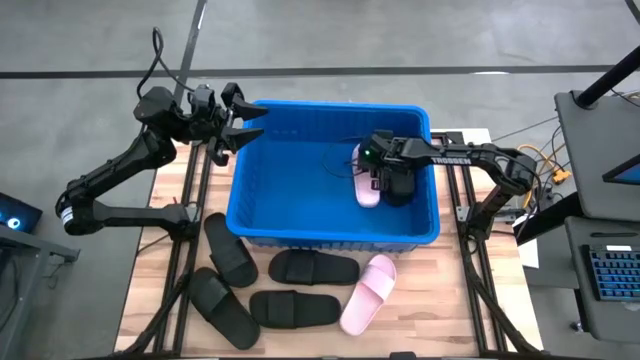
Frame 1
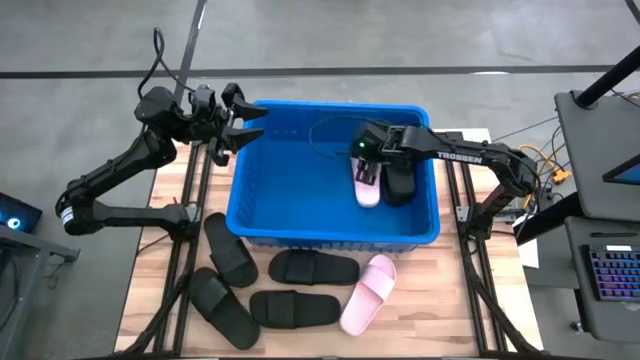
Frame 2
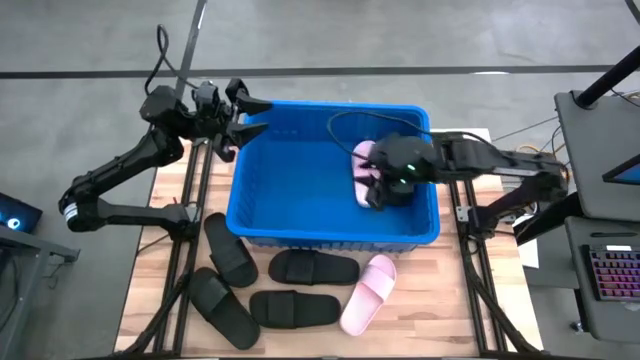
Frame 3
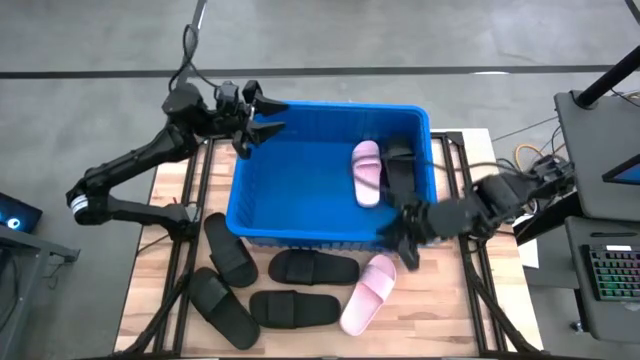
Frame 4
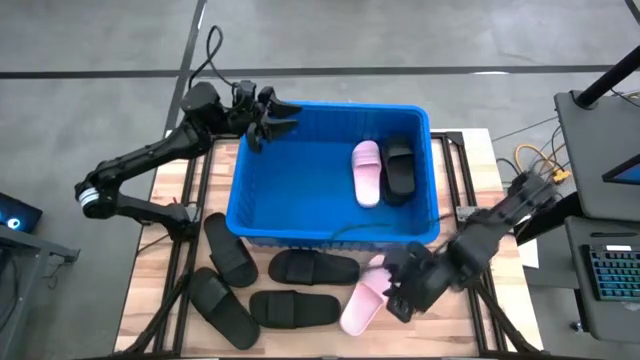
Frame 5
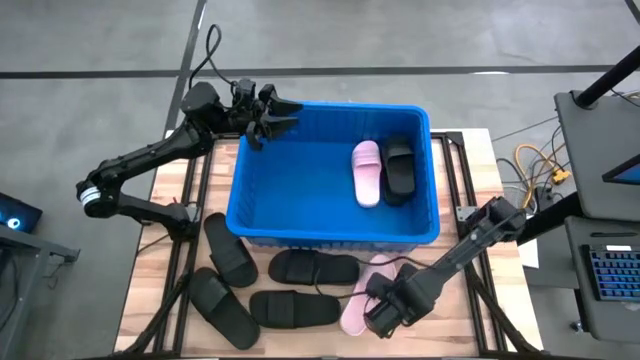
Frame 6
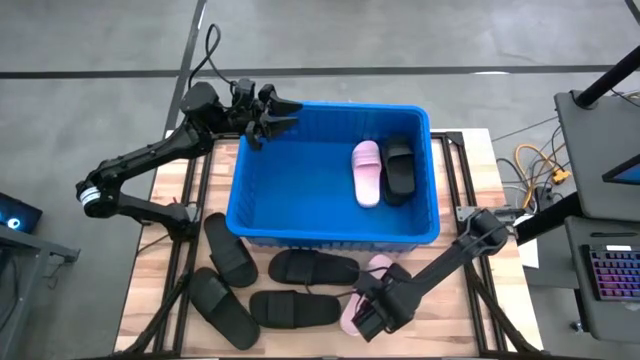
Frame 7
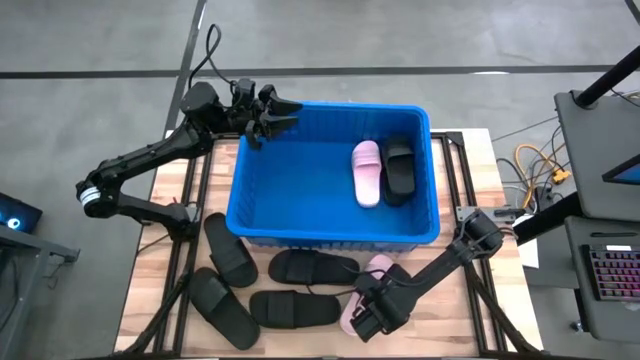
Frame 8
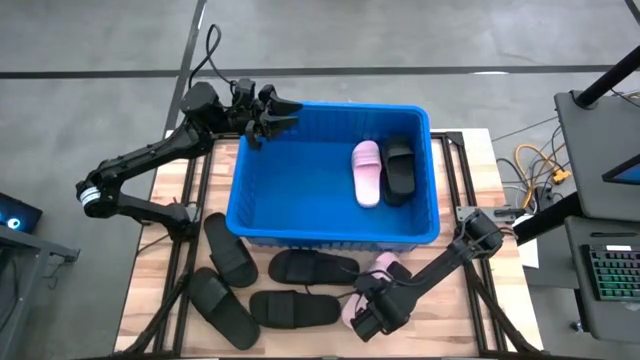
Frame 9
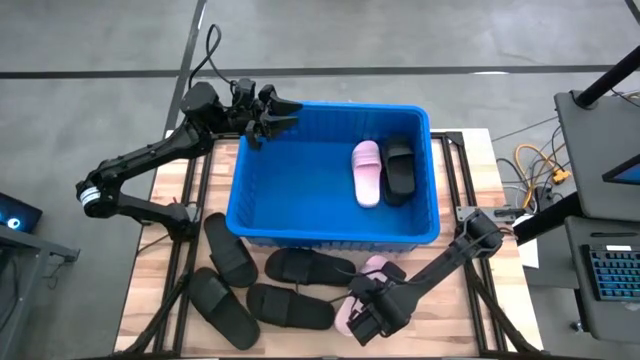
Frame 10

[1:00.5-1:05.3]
Task: Pick and place slides into bin
Put the pink slide into the blue container

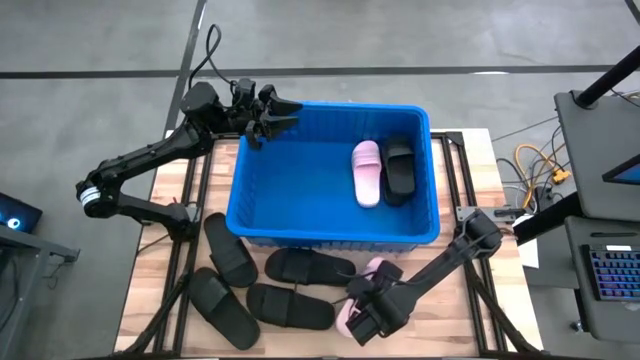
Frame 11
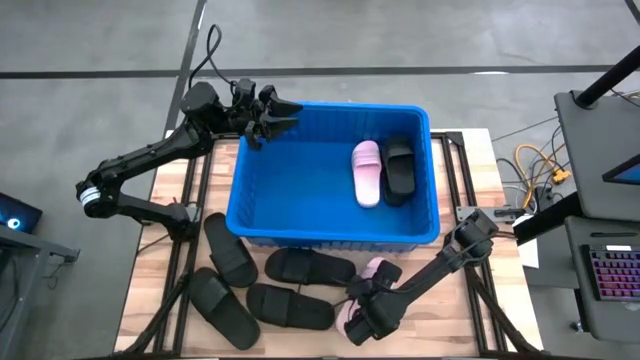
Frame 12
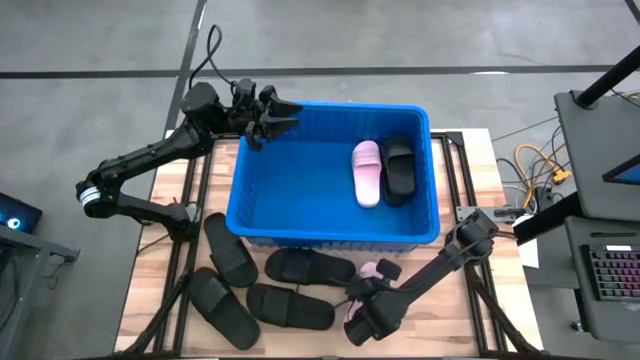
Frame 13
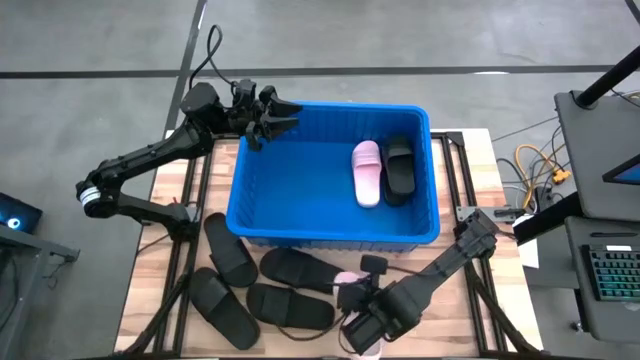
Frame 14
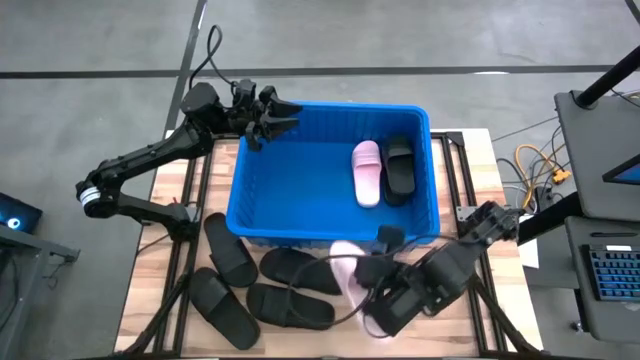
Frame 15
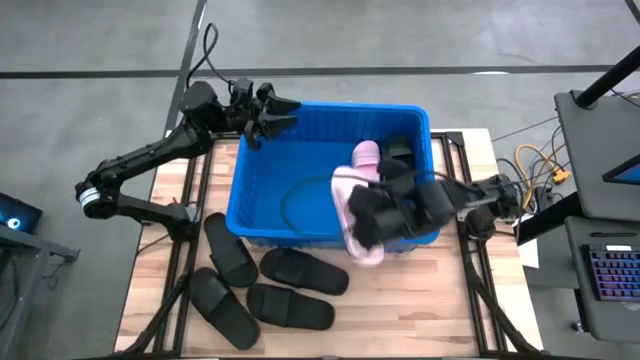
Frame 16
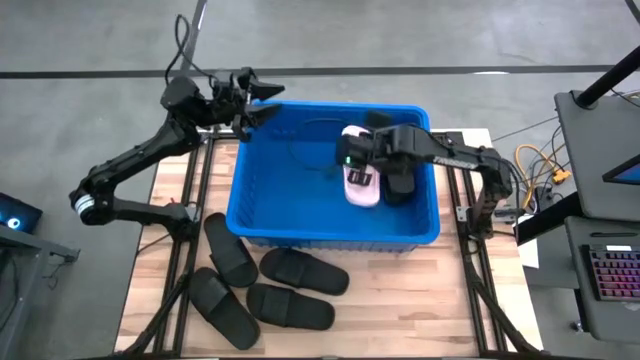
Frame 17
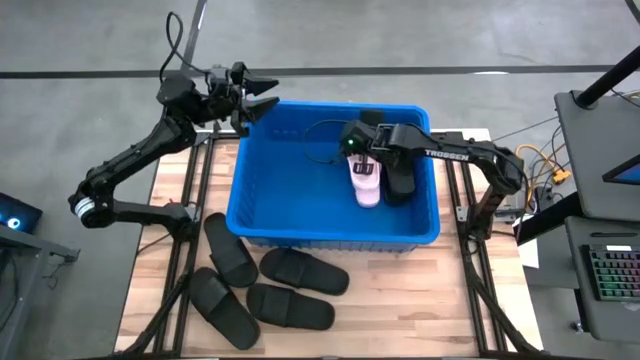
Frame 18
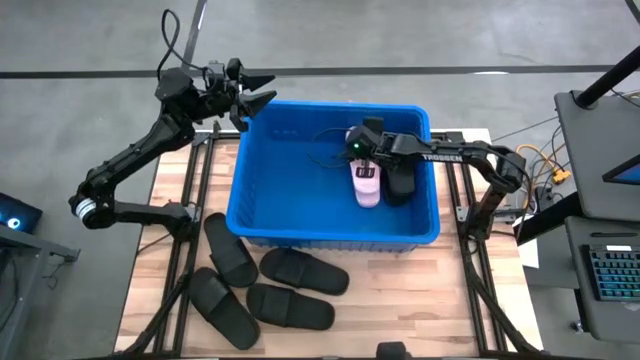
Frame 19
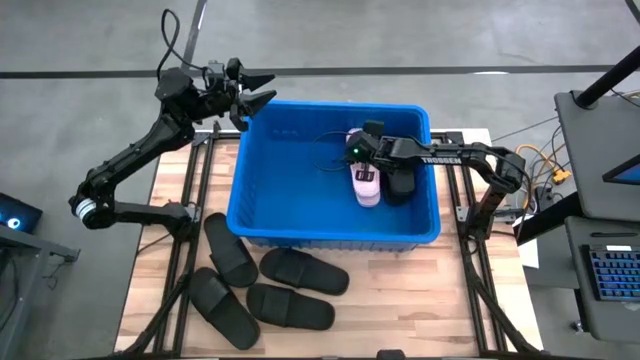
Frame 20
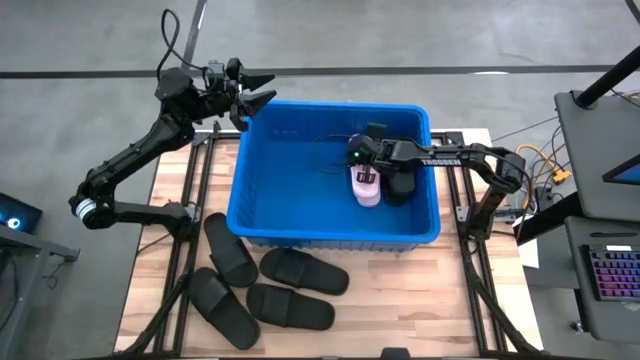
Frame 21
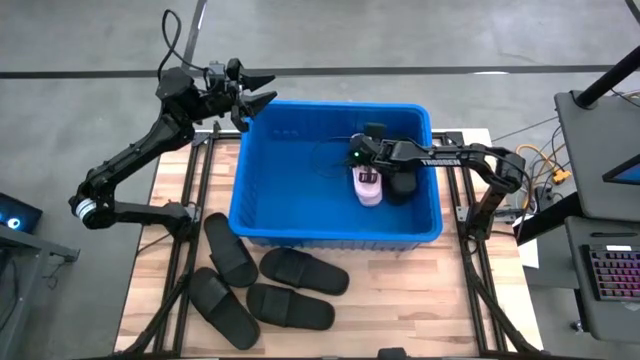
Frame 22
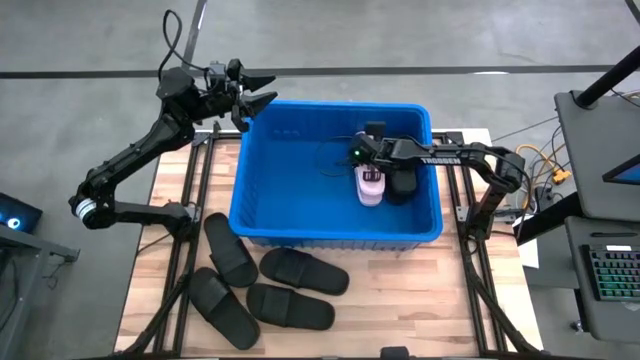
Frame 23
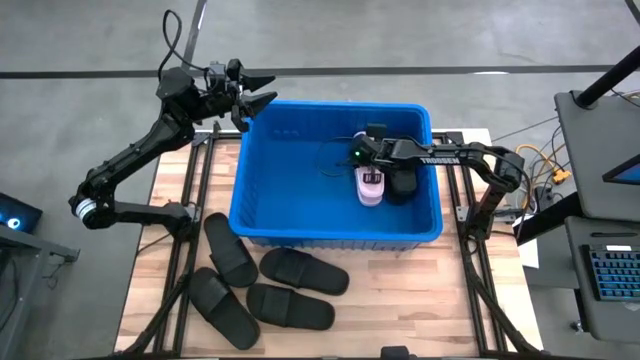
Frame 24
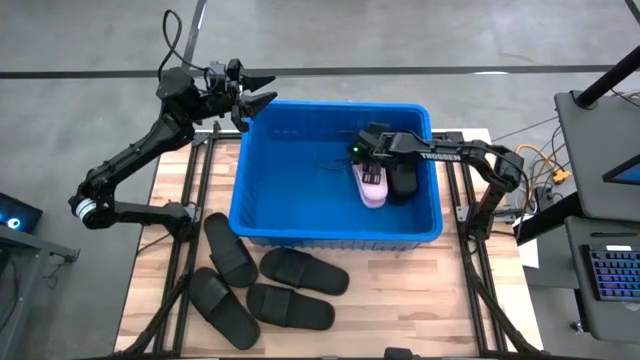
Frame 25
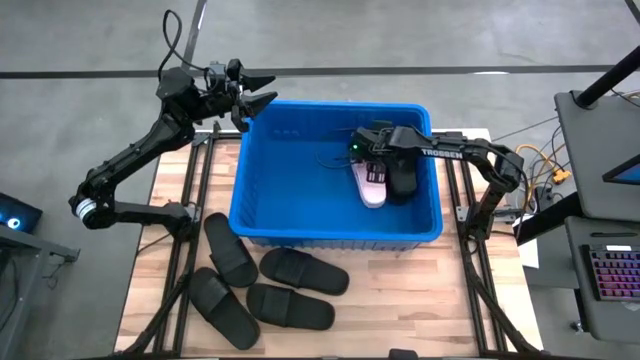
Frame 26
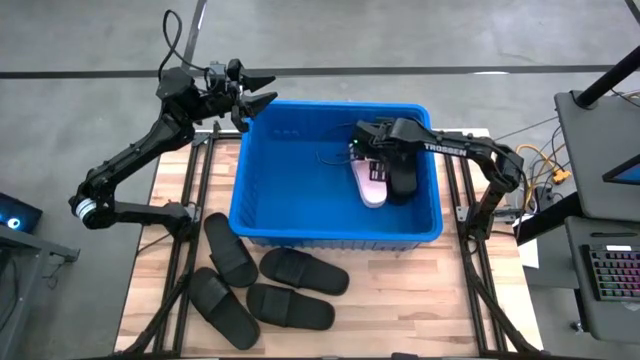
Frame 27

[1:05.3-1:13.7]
Put the pink slide into the blue container

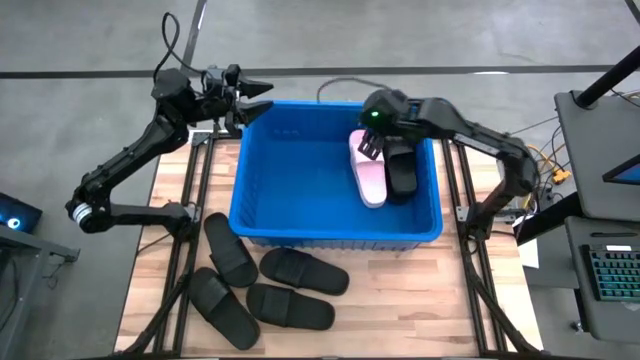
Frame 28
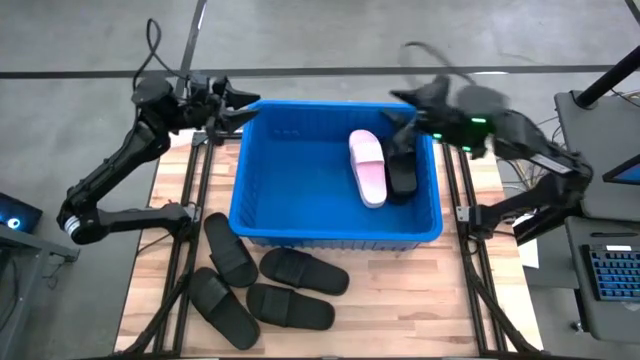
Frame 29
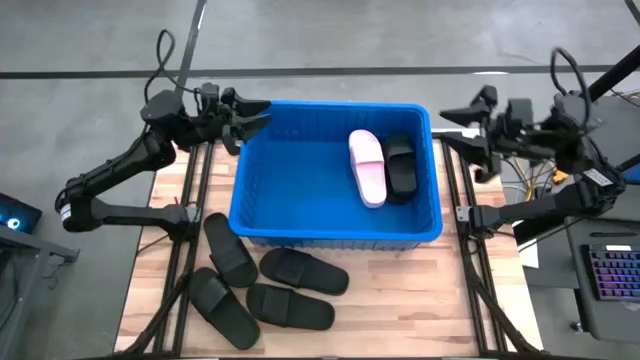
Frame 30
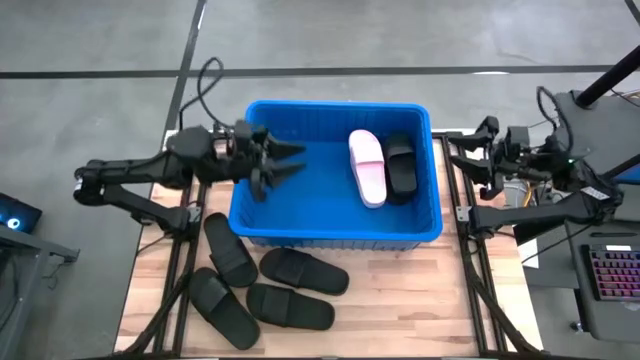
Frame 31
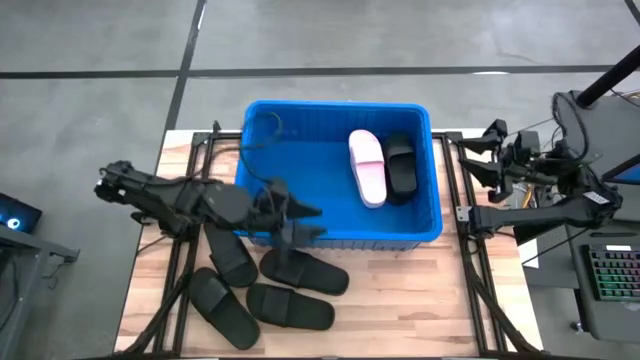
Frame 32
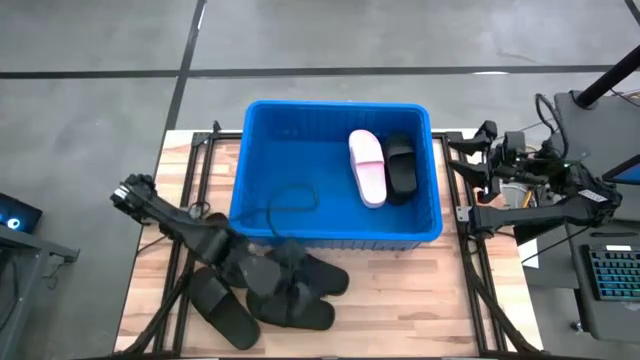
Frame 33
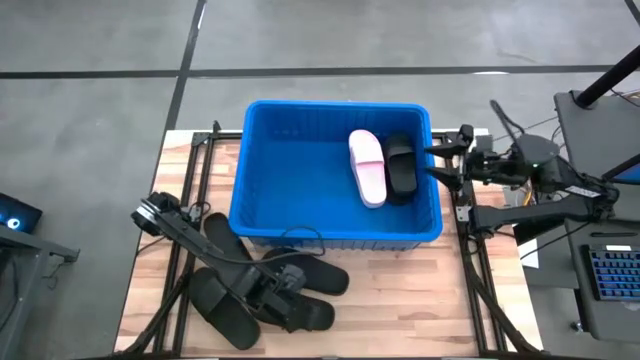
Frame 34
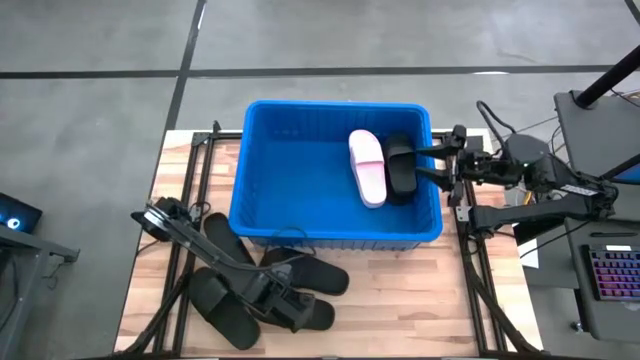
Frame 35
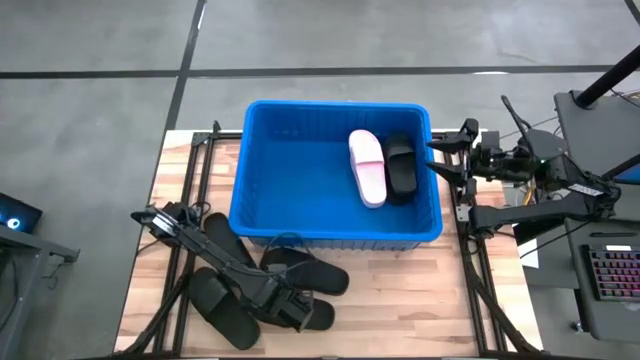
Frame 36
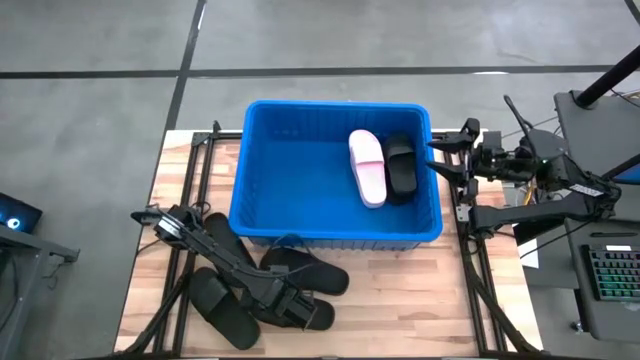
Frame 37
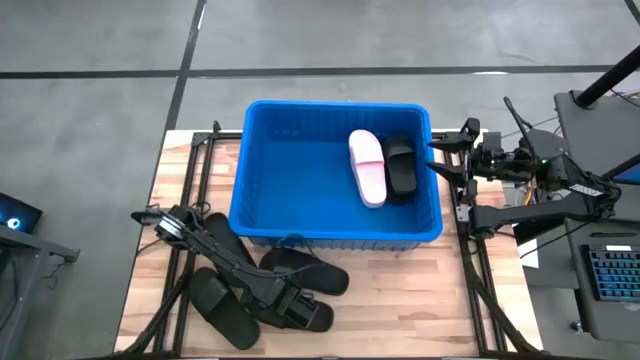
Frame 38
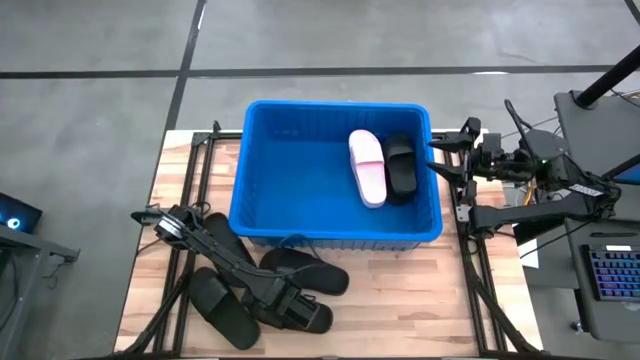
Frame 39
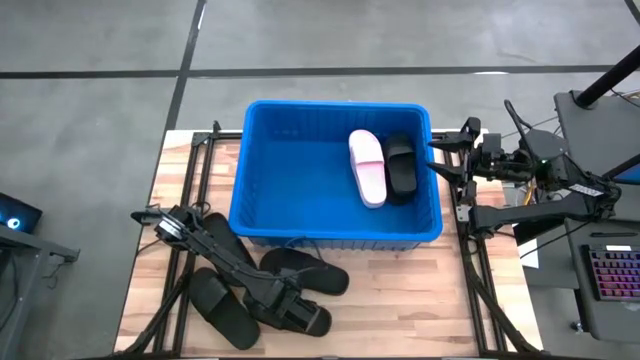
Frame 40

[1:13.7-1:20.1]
Put the black slide into the blue container

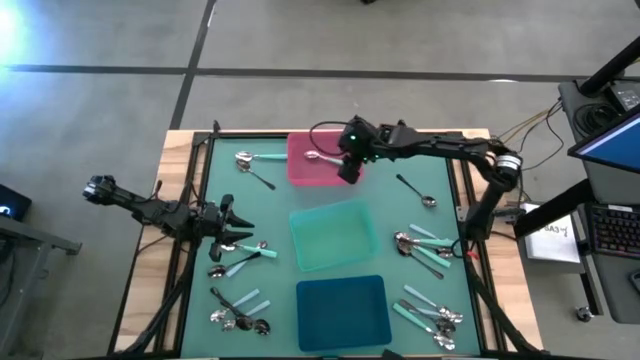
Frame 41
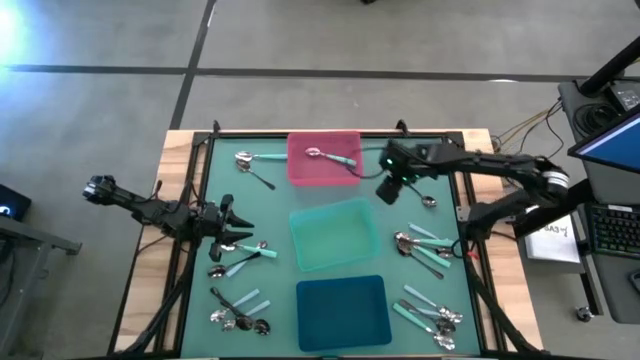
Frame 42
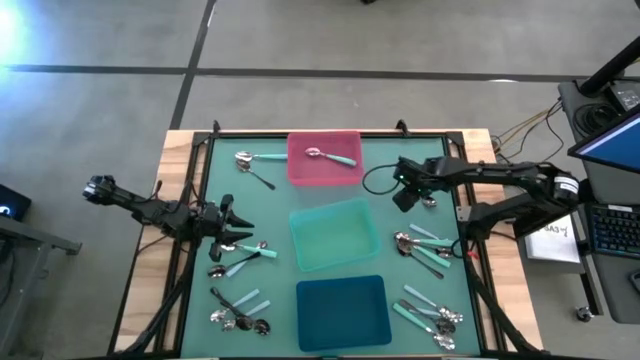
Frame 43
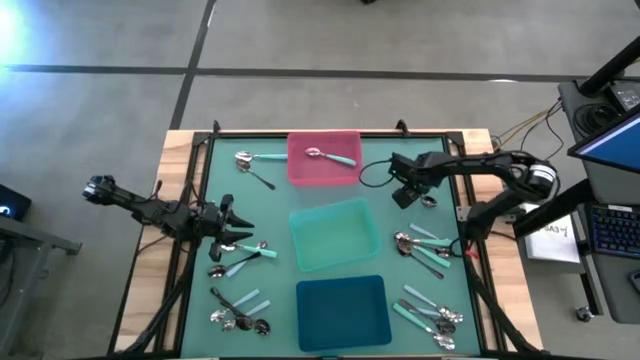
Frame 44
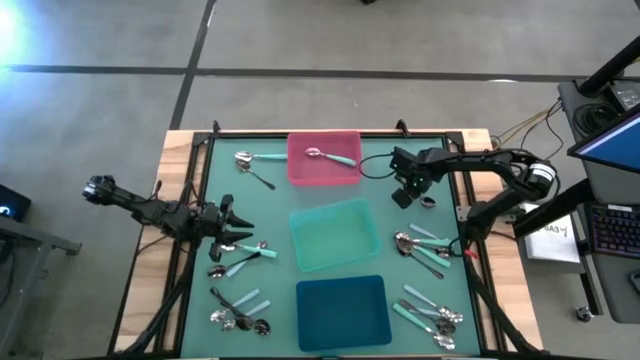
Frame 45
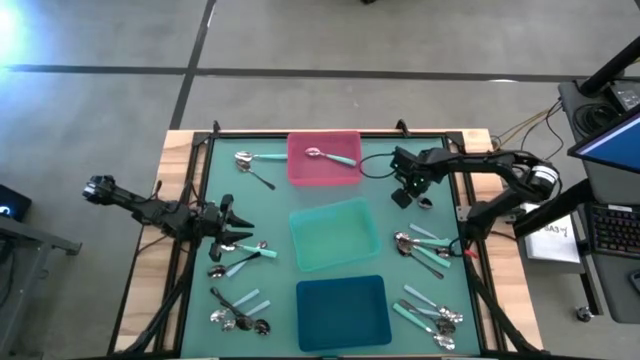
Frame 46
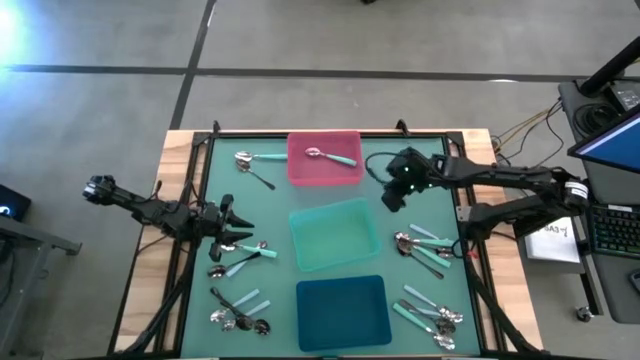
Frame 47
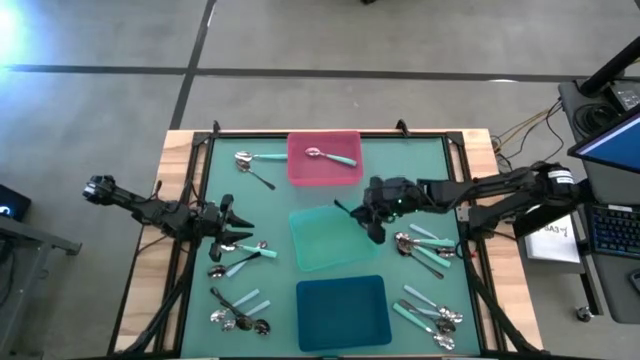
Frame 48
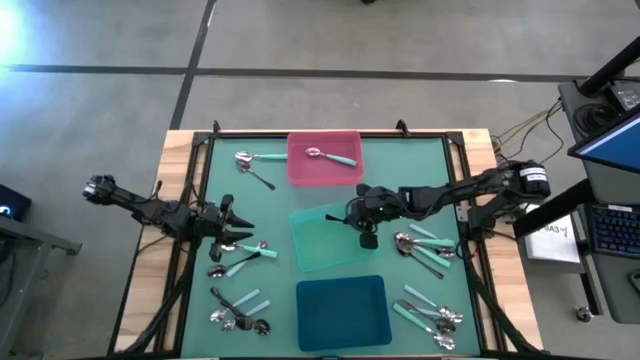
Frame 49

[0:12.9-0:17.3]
Task: Sort silverware by color (type)
Put the black spoon into the green bin
